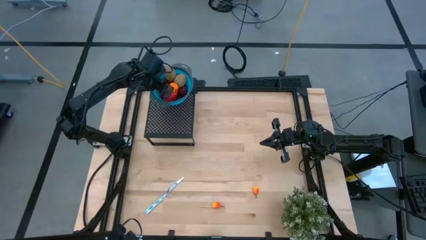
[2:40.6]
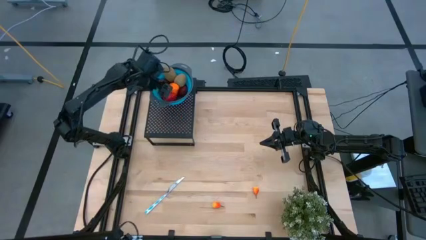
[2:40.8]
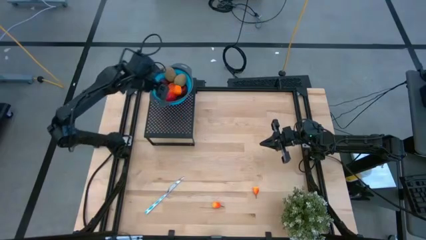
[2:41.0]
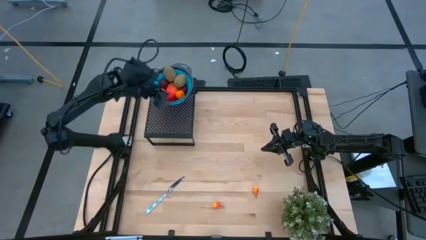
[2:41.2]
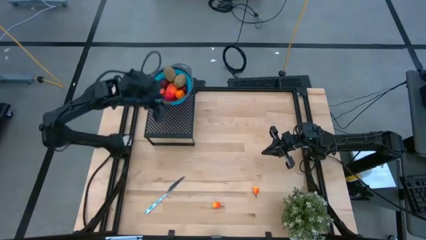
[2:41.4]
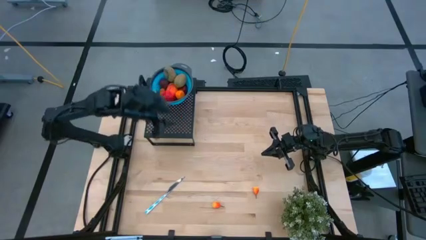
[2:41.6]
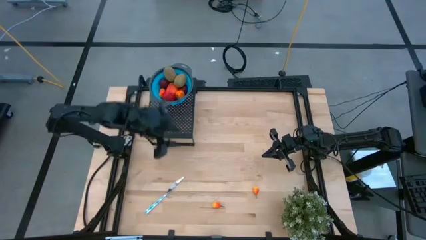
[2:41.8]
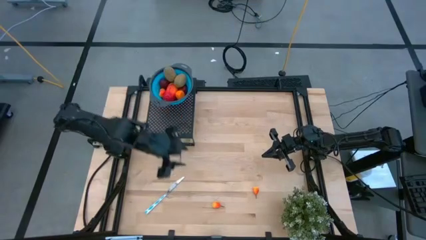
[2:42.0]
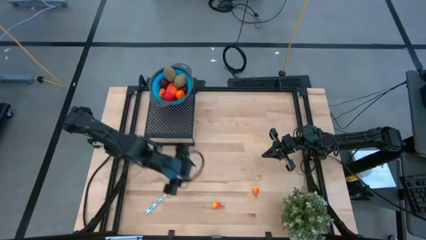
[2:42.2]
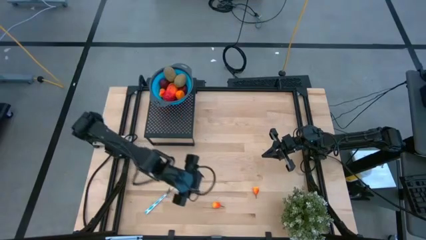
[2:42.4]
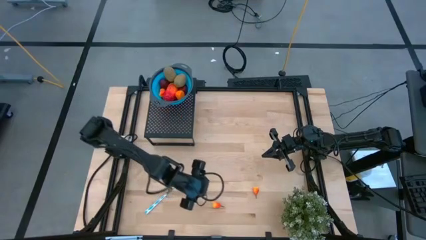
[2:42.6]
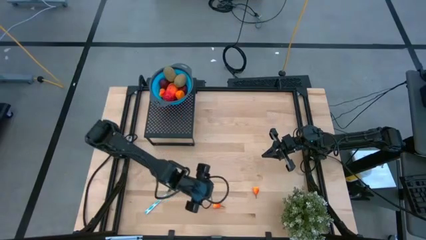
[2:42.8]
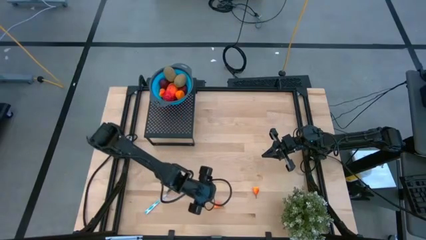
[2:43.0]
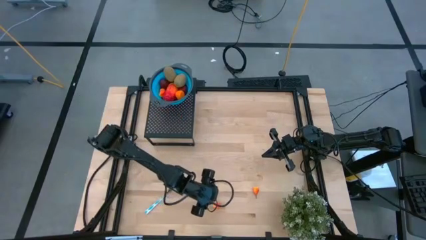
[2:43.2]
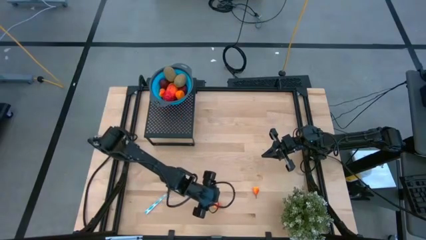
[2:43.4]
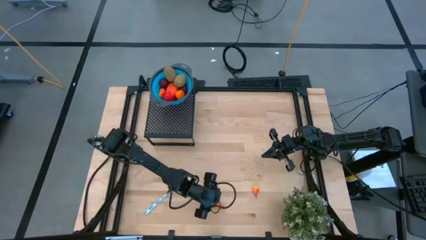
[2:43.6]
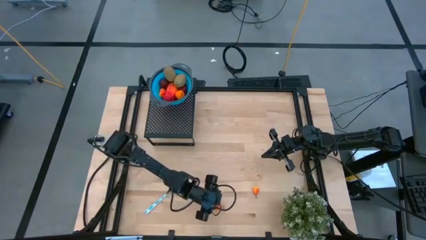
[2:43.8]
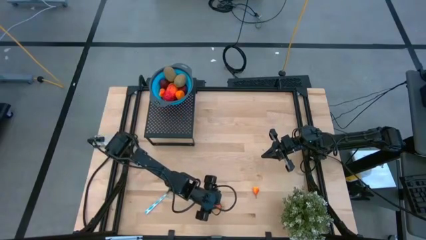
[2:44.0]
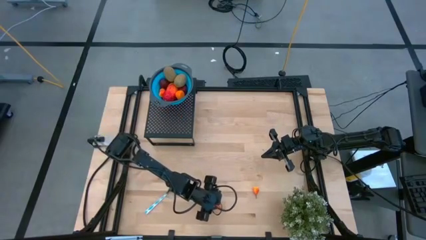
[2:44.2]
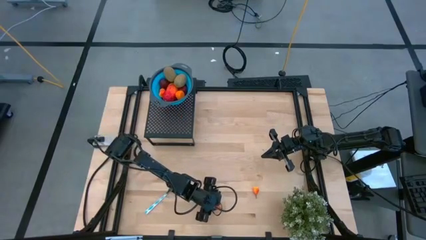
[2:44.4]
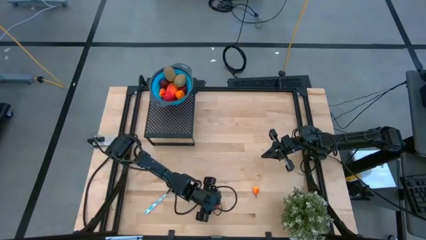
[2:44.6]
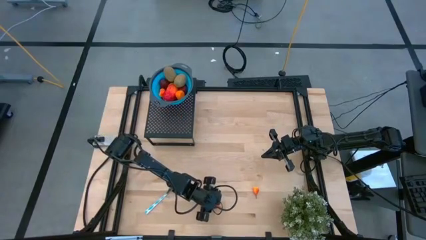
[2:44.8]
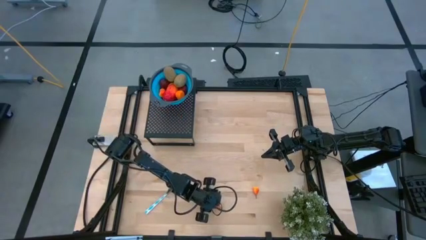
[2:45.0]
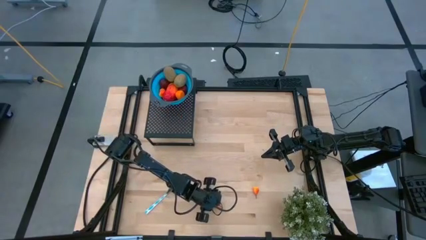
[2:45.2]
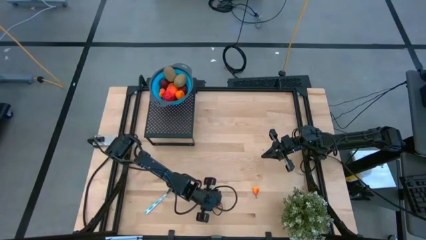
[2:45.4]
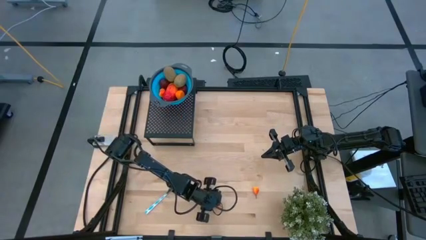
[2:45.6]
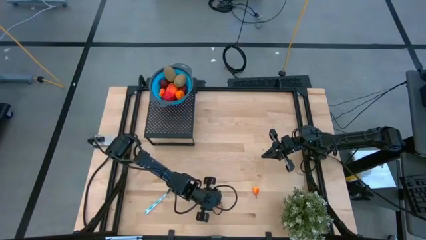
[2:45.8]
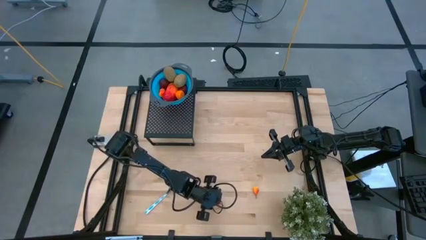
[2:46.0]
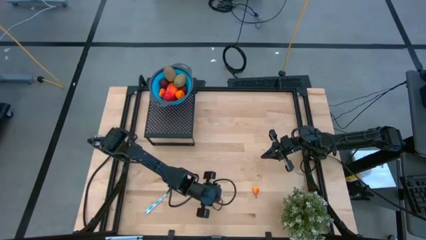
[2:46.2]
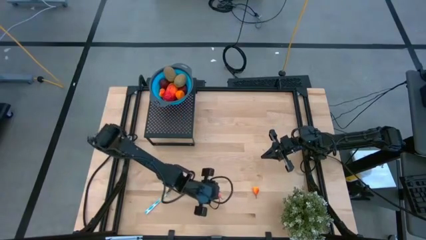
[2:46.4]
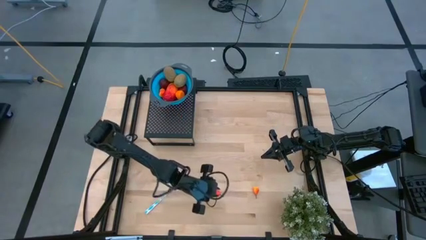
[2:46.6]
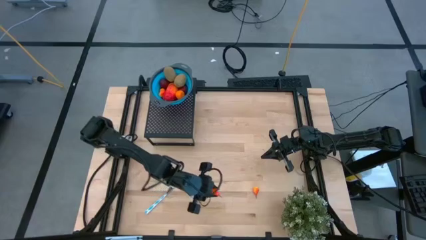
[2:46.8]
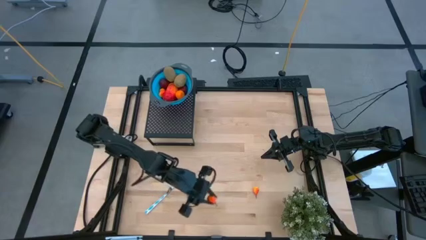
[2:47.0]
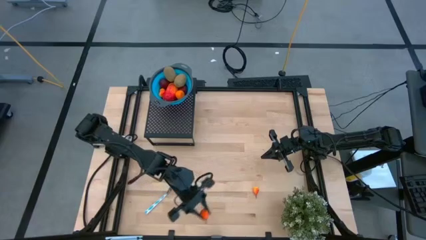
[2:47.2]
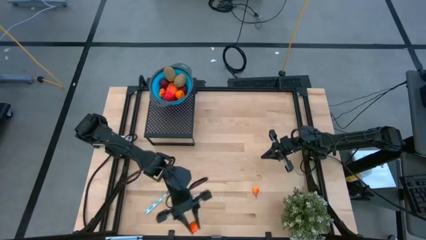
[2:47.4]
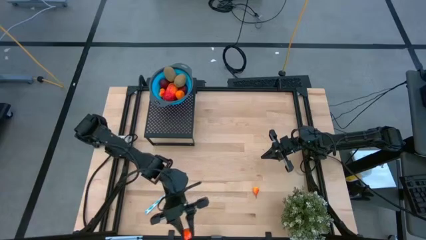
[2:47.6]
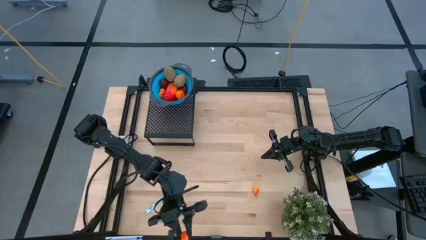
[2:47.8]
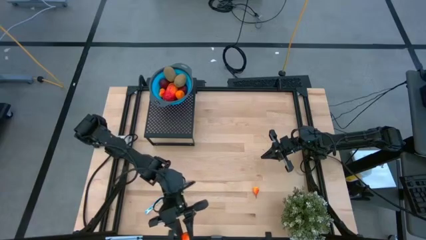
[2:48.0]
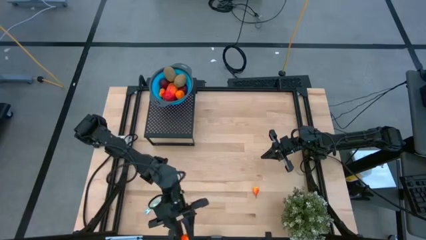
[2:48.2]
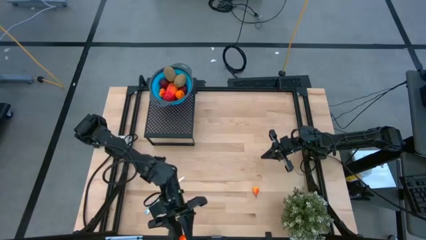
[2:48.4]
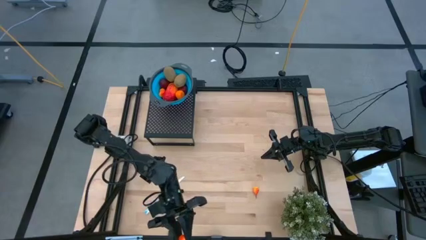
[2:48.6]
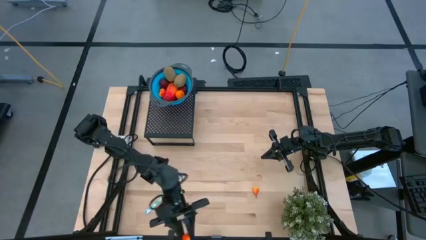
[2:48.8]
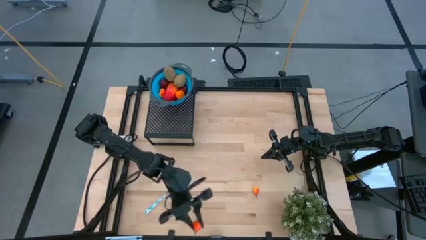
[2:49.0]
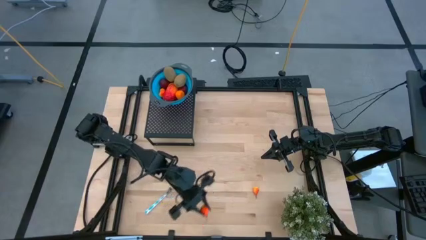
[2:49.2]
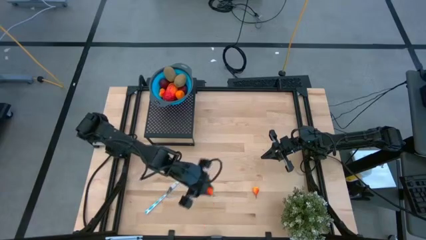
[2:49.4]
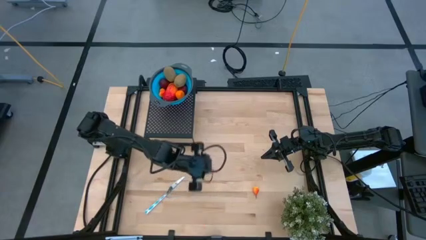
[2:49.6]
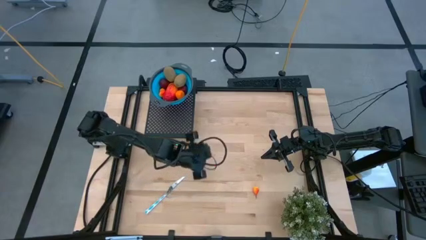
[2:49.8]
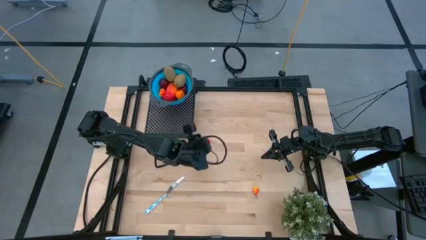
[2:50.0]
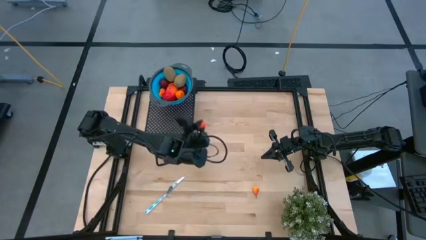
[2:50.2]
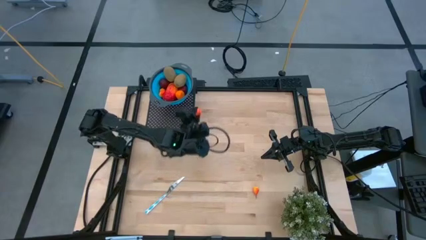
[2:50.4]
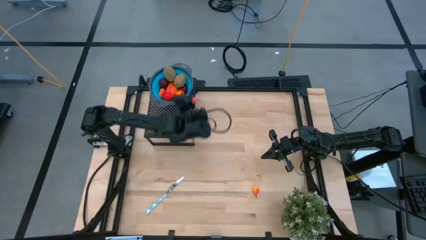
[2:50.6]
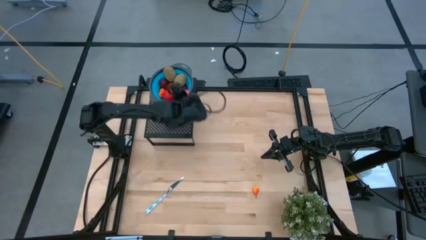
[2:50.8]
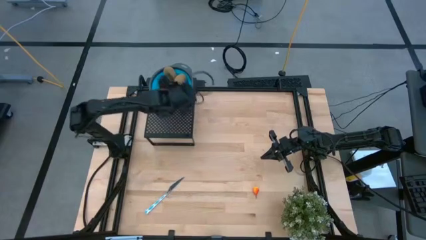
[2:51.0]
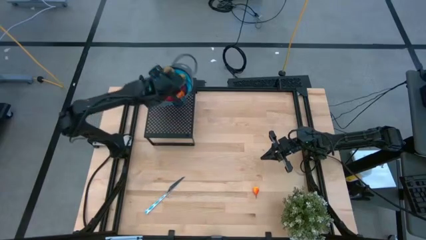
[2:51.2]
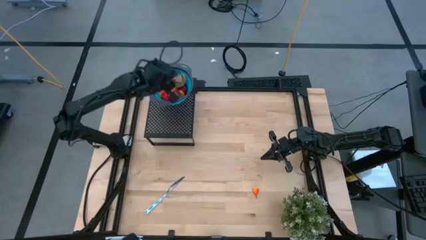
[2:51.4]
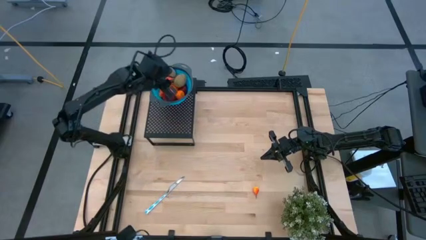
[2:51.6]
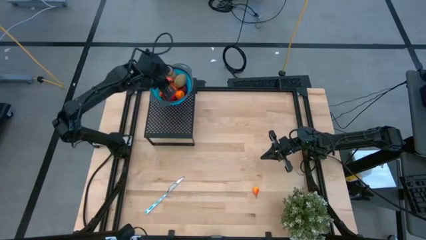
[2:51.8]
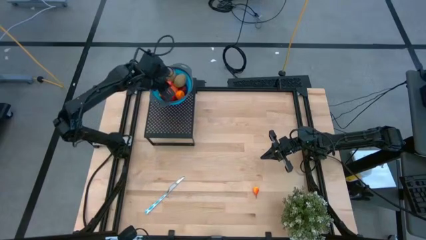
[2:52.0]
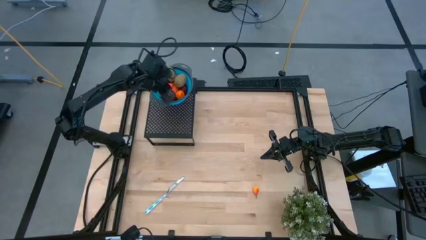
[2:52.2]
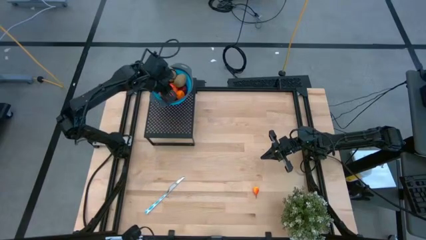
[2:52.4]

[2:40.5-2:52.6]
Task: Pick & Place Fruit
Put the left peach into the blue strainer bowl on the shelf

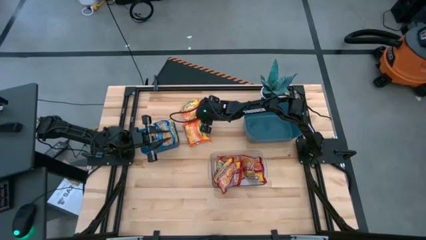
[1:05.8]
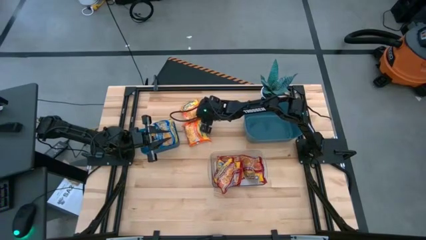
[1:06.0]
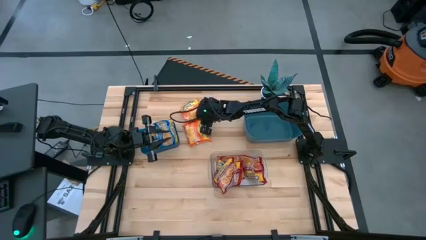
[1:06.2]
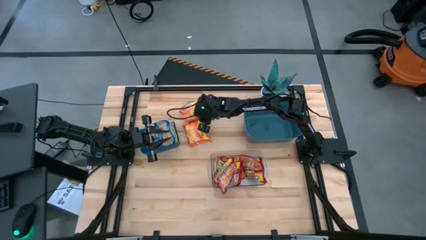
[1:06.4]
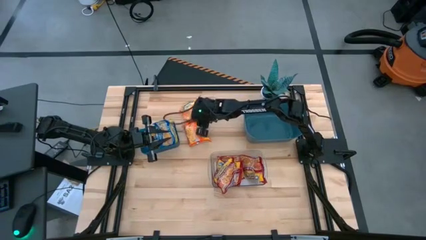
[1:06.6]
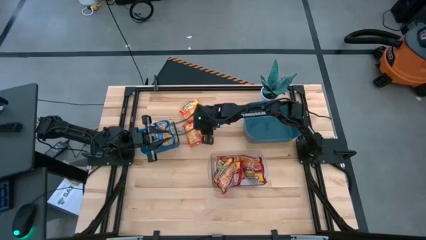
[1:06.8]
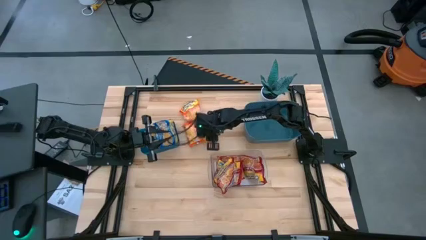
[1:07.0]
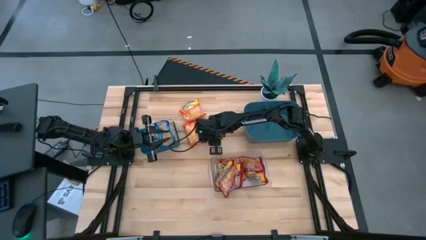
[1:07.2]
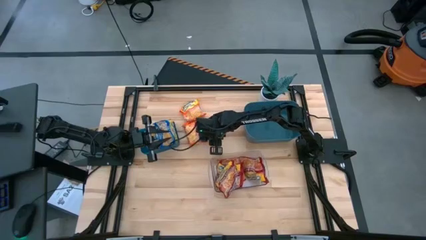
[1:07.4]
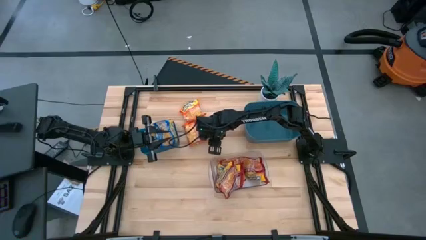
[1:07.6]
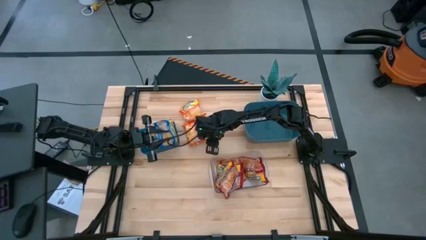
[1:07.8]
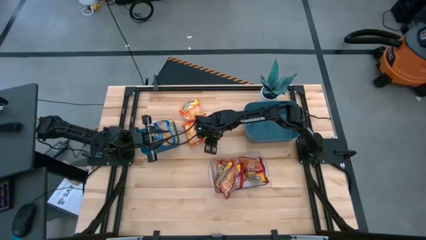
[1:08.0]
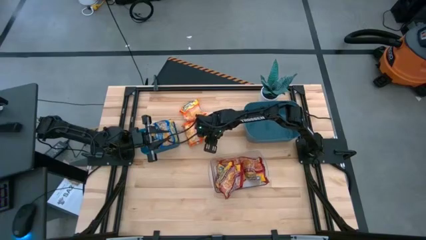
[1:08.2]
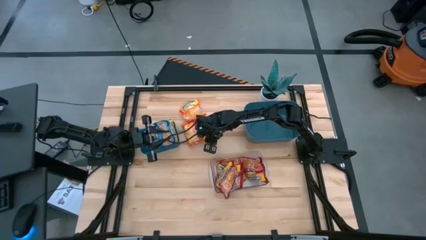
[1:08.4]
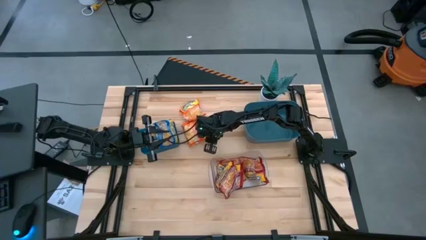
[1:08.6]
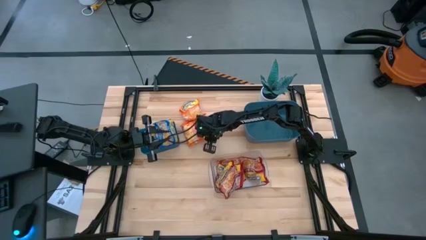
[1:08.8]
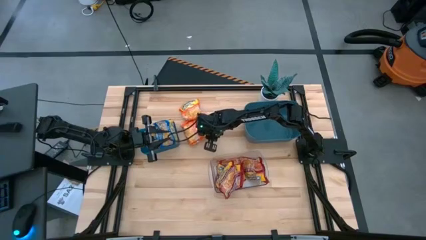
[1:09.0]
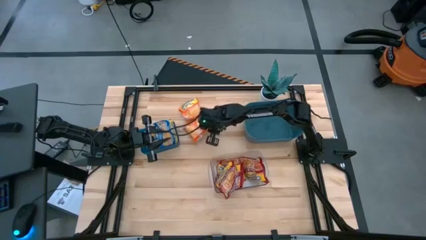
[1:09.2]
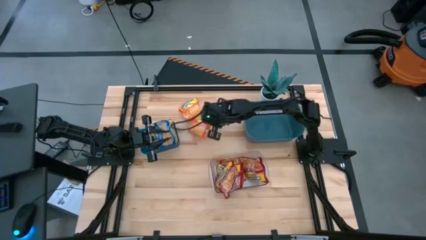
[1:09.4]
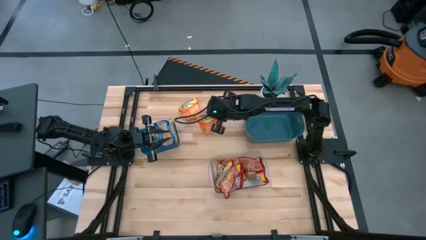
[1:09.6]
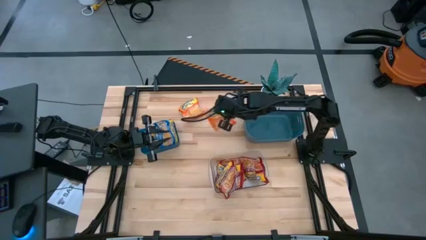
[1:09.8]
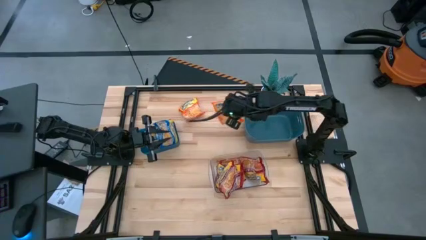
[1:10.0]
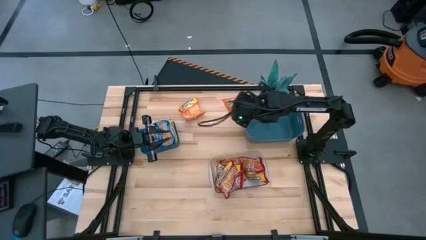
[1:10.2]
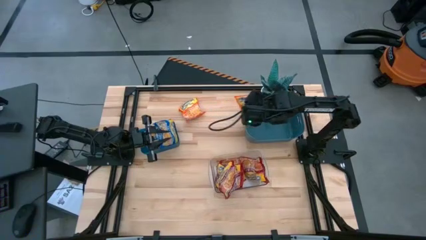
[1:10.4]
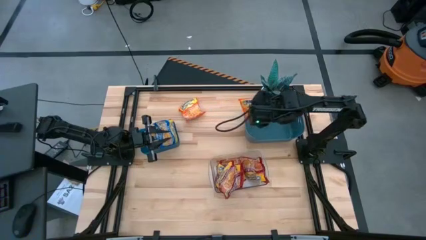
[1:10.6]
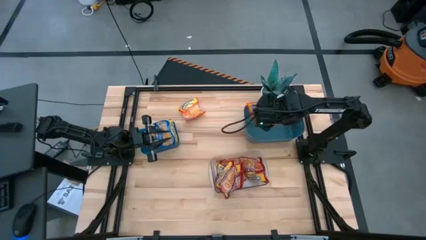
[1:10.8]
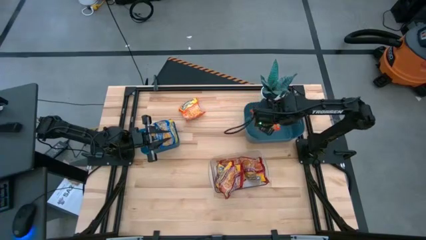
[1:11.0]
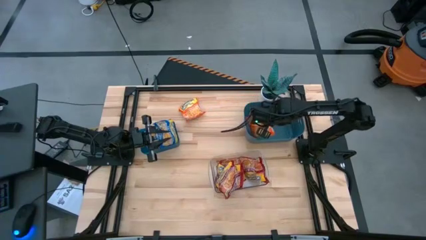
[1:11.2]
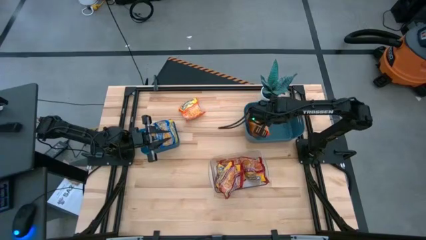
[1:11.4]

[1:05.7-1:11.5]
Task: Sort Maruchan noodles
Put the orange noodle pack into the green bin
